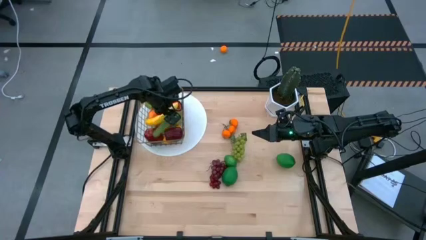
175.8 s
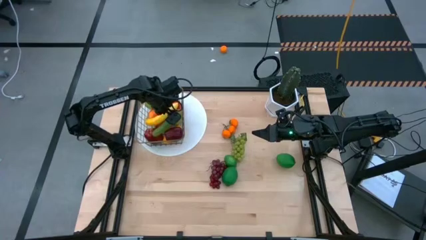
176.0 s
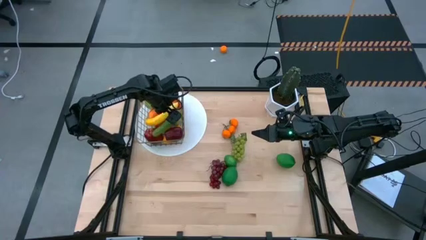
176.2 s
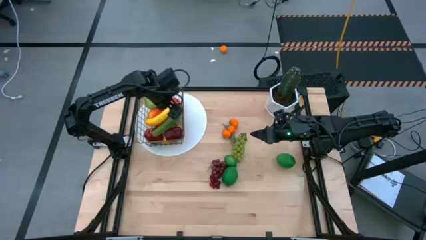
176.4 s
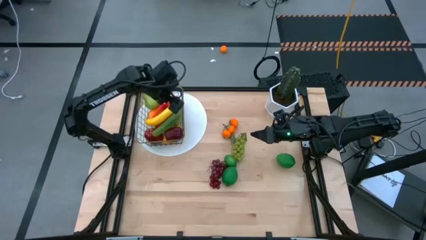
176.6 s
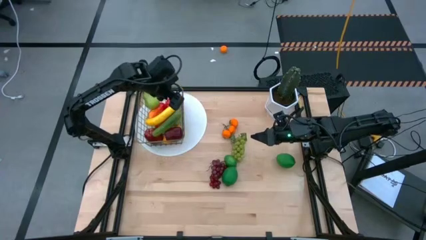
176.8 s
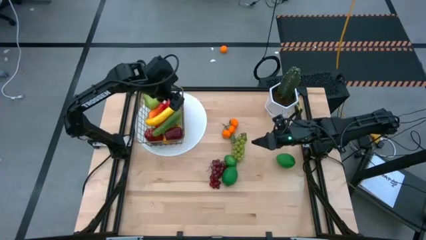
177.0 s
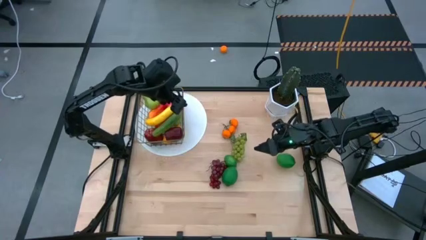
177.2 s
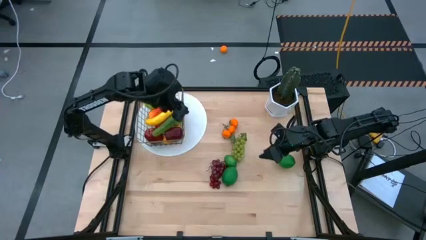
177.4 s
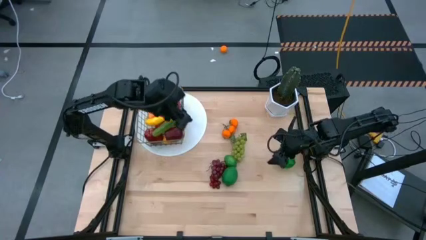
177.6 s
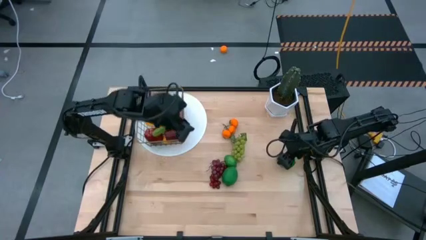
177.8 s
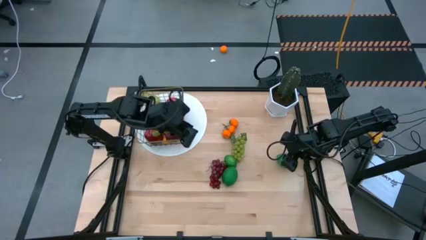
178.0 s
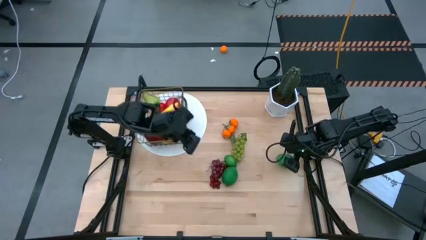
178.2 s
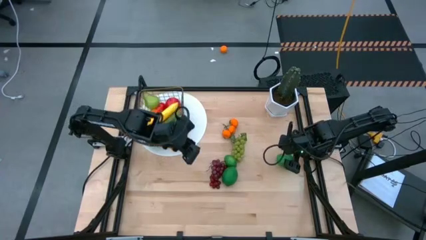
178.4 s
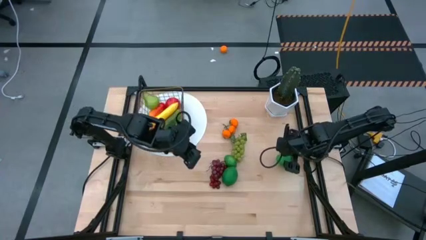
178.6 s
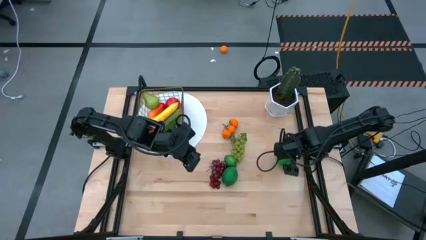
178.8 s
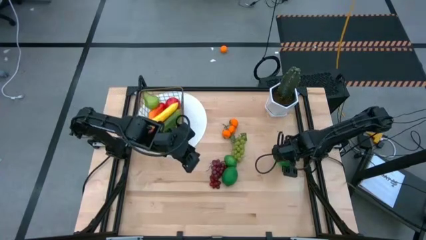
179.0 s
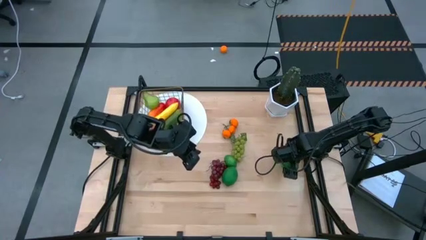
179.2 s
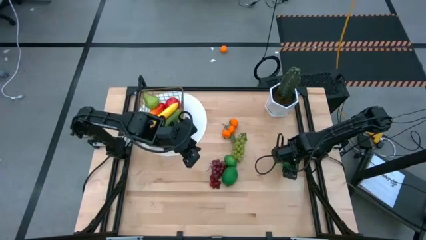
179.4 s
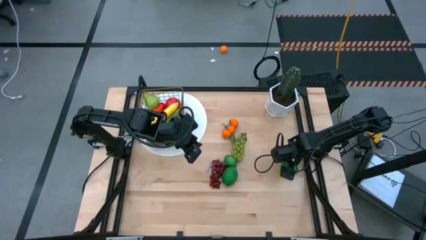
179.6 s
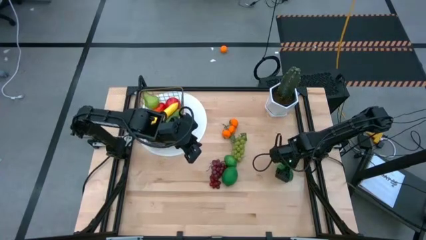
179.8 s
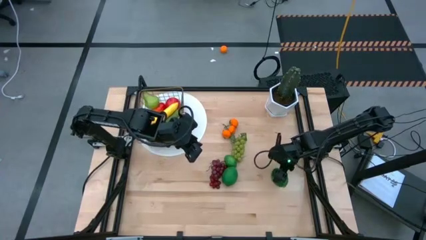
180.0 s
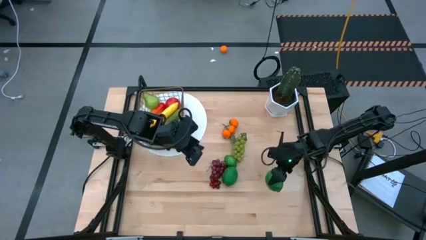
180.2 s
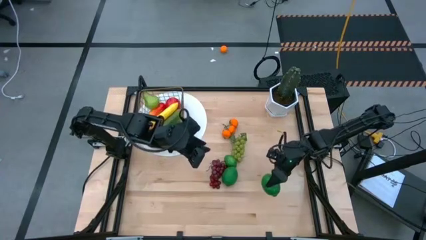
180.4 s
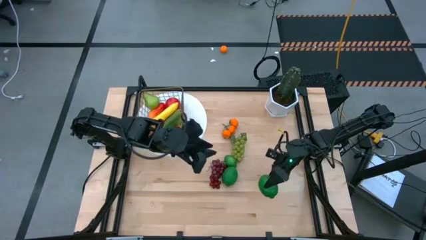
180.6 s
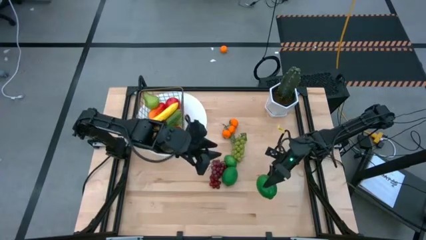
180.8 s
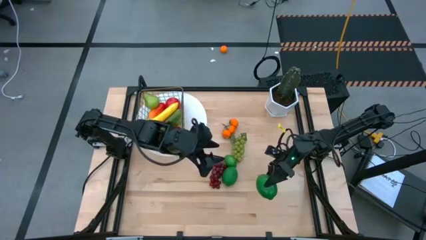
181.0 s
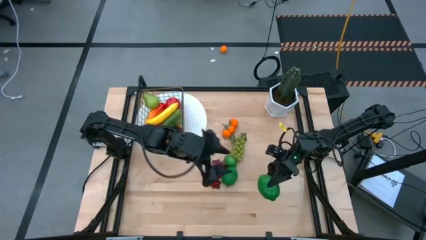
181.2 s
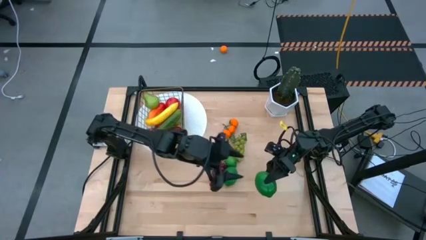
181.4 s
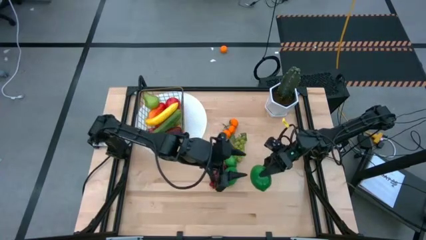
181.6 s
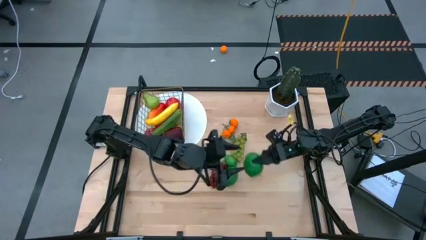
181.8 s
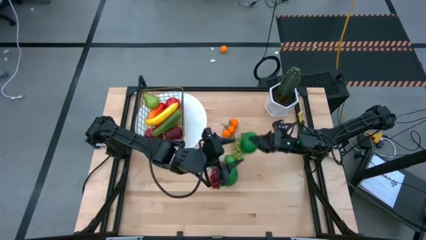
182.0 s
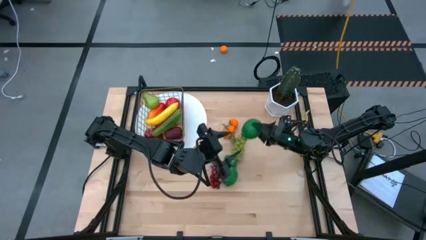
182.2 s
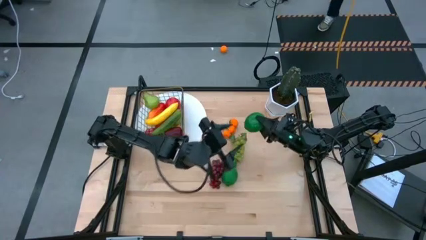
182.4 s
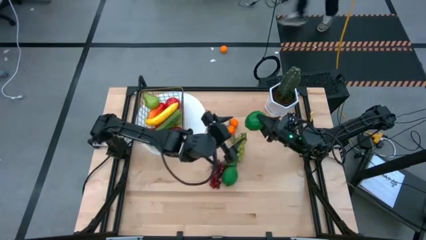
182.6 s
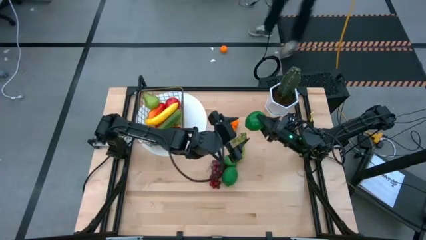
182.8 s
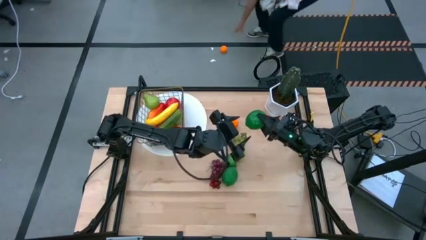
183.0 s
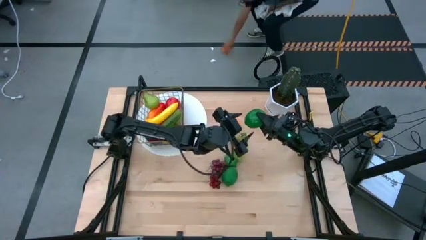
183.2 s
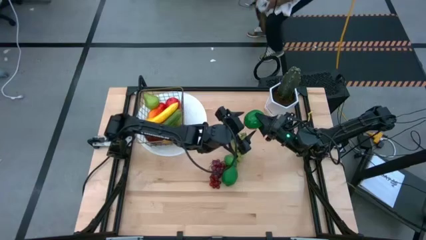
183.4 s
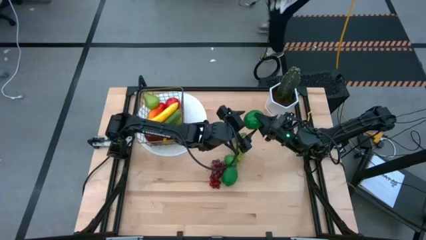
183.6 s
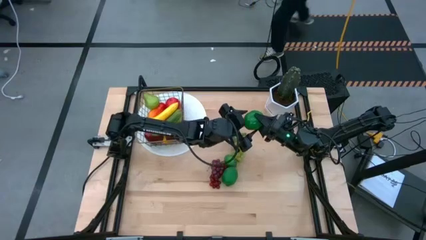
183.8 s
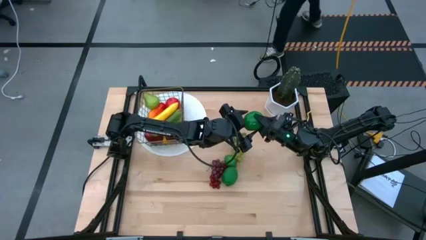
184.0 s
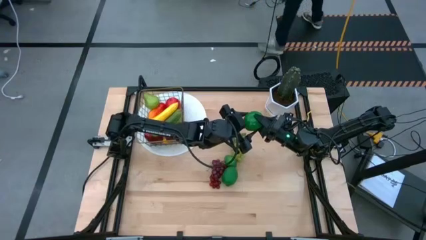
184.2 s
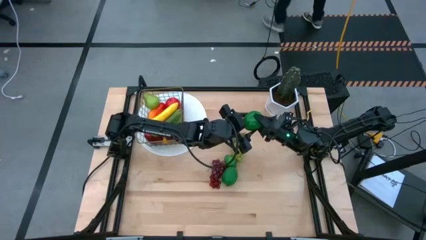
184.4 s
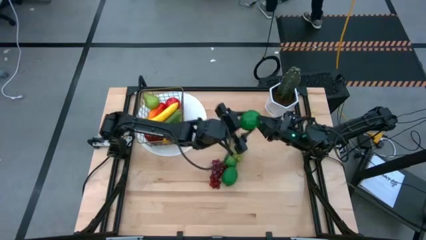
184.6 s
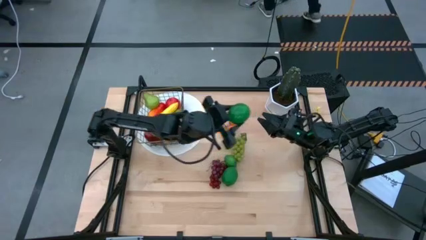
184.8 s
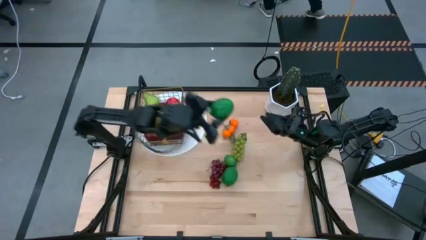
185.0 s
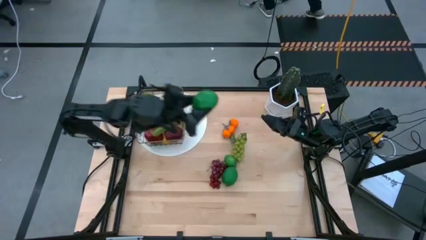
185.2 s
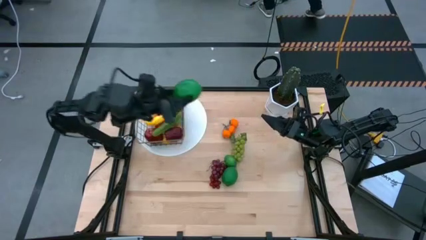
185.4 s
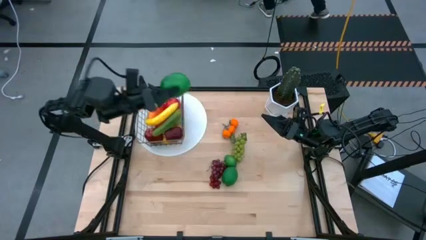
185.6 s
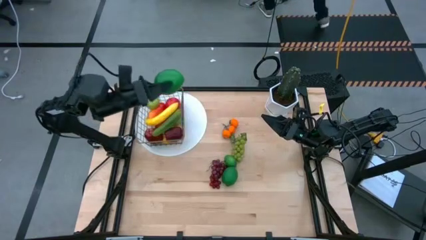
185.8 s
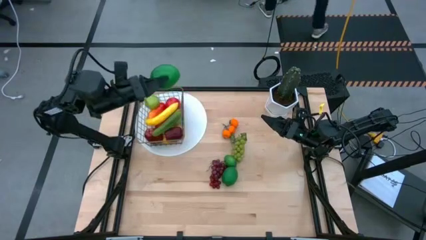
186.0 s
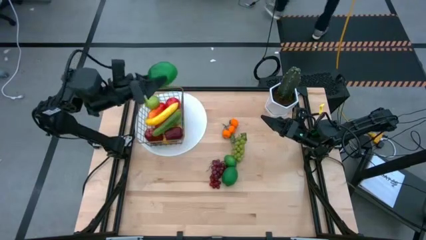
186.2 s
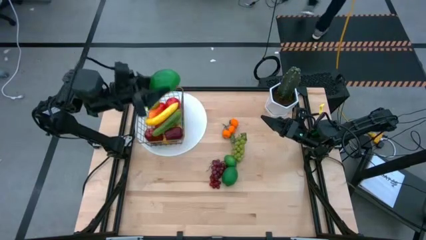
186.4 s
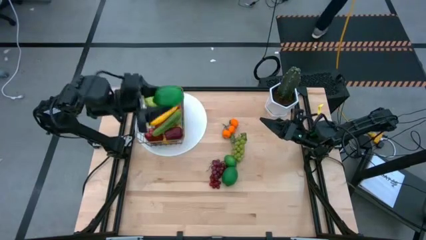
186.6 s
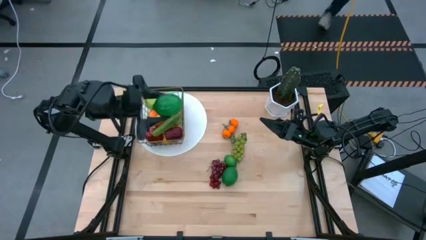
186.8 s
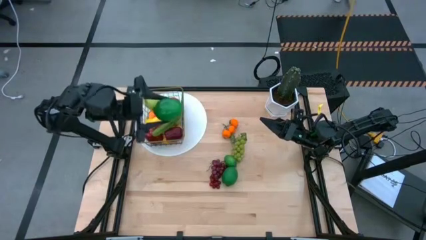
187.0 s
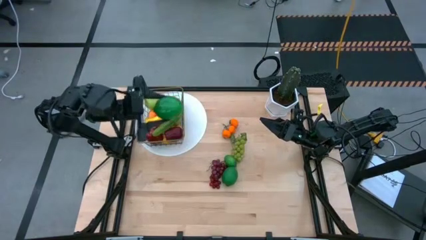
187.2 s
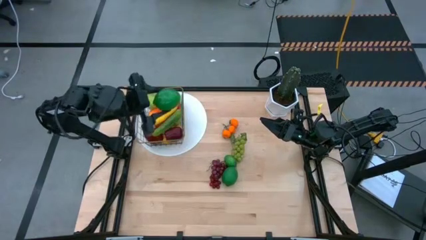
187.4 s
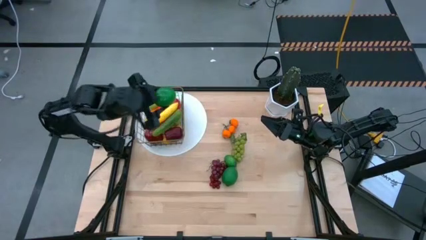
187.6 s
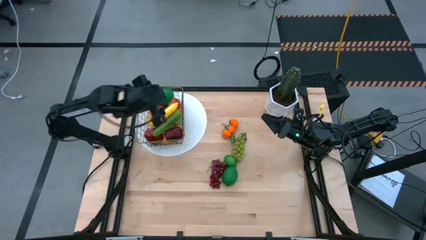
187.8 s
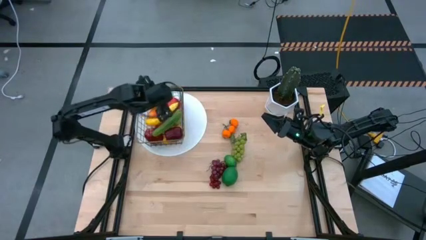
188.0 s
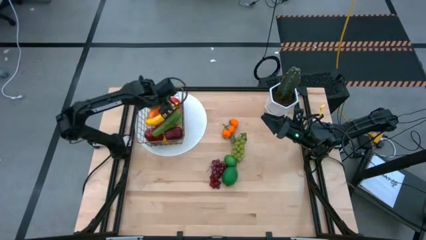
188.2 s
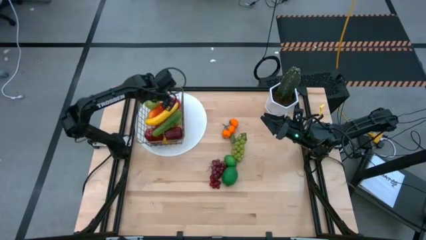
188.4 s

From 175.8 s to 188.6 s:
Task: Build produce basket
Put the top right green lime into the wire basket

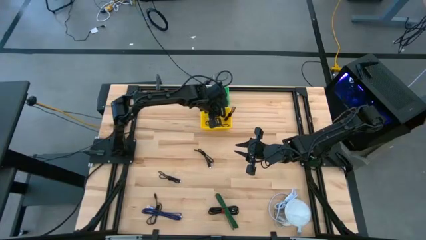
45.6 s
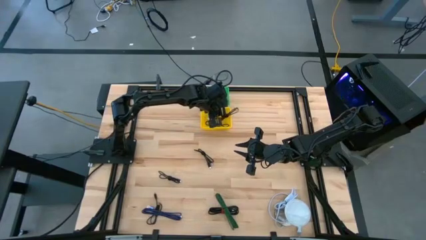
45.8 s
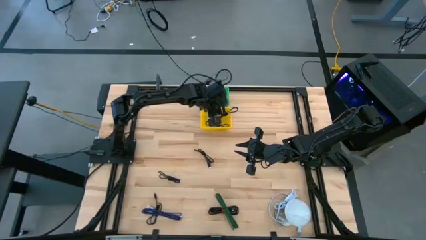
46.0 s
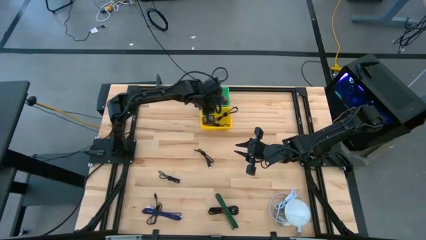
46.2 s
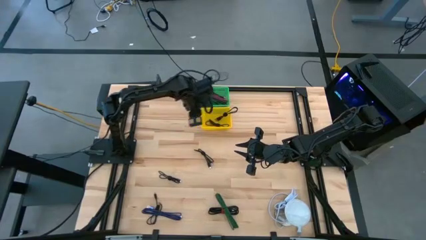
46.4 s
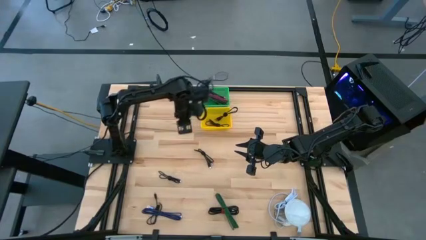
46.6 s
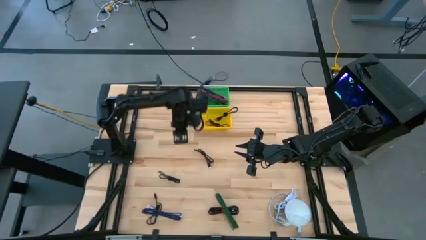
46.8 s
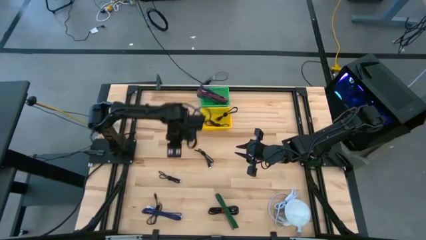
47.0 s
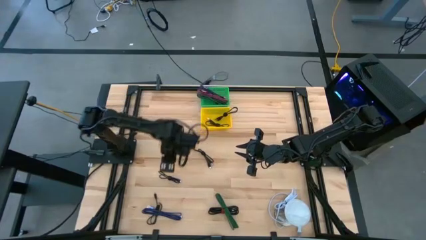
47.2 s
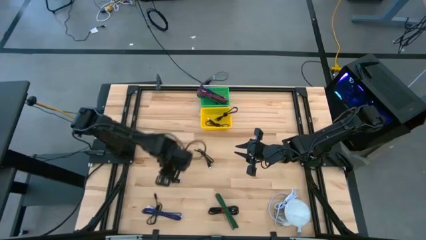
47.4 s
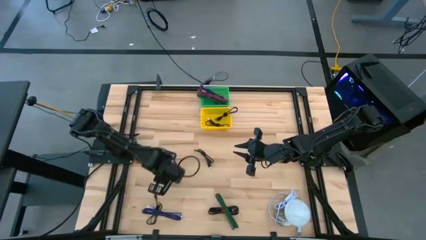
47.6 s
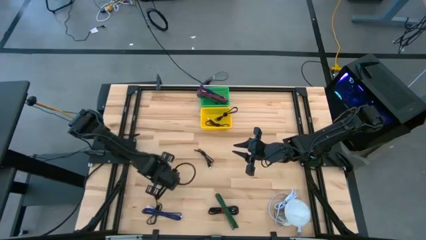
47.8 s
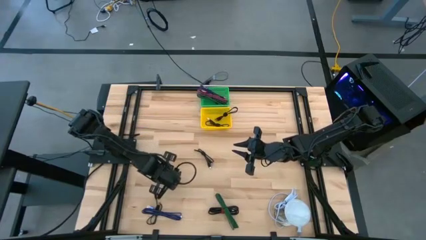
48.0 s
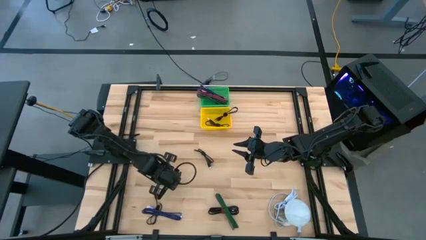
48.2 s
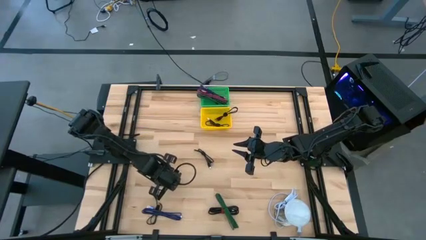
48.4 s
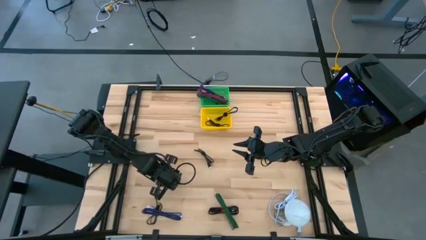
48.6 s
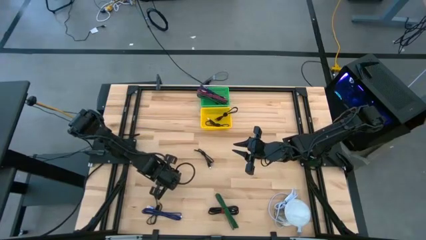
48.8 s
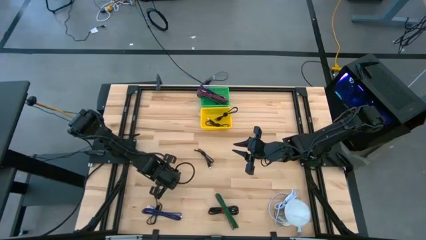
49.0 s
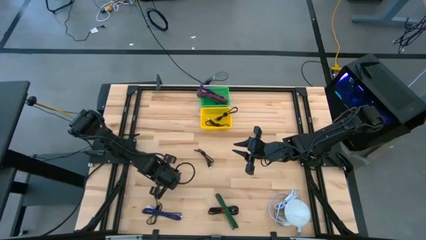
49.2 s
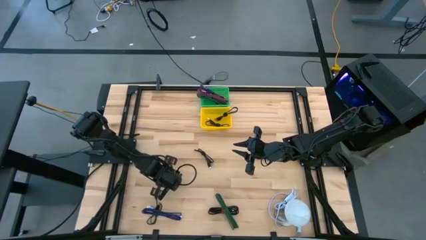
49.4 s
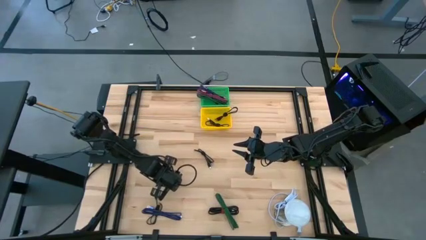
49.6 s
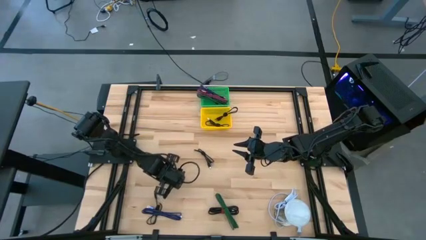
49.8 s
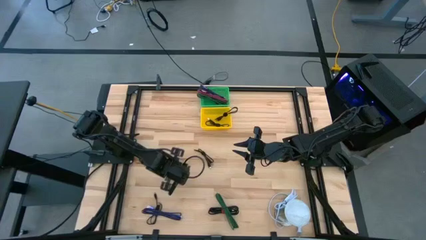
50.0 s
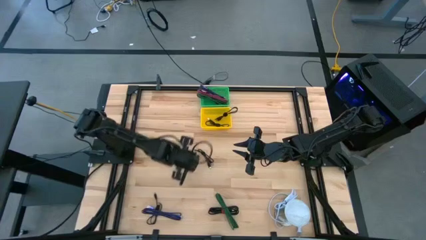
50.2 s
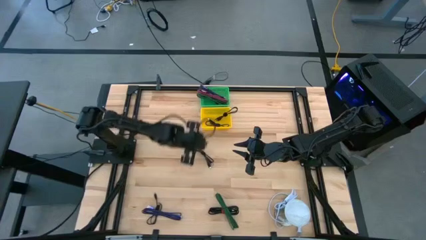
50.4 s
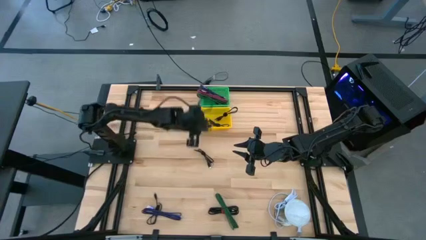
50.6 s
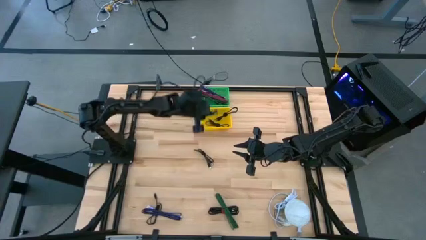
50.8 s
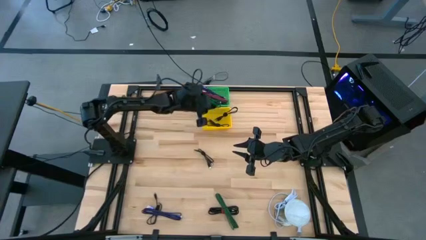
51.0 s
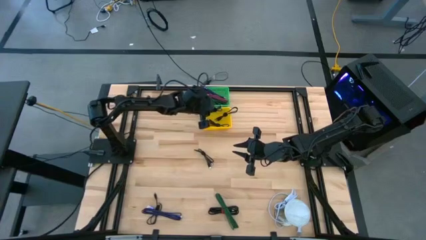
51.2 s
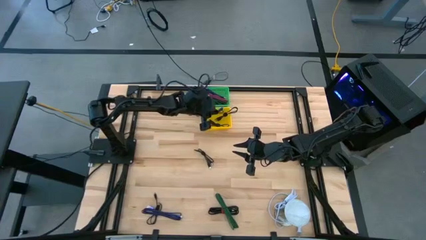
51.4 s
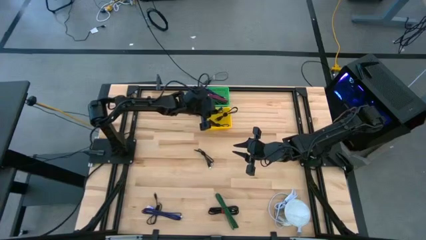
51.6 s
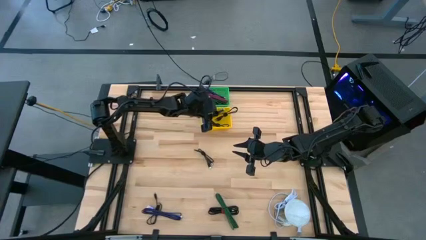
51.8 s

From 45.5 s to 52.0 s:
Task: Pick & Place USB Port
Put the middle-left black charger cable into the yellow basket
